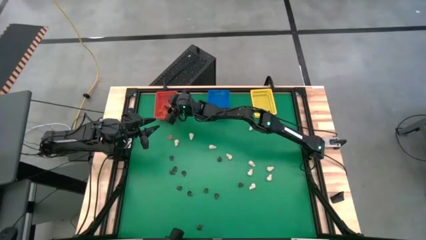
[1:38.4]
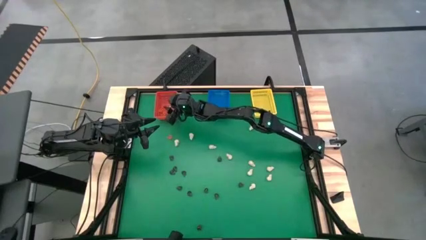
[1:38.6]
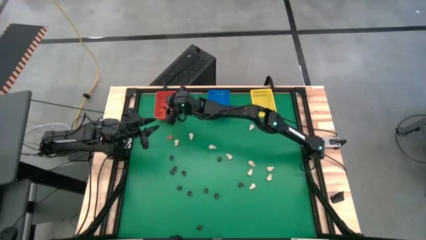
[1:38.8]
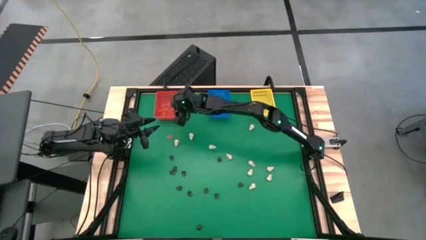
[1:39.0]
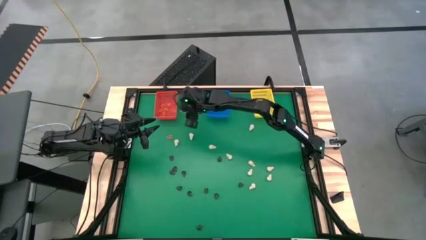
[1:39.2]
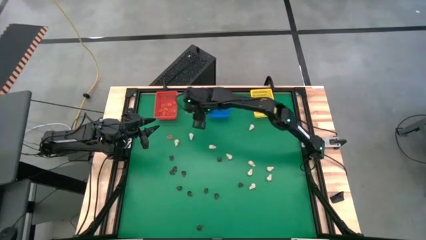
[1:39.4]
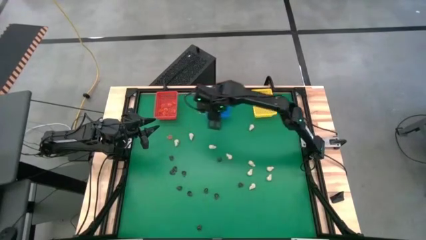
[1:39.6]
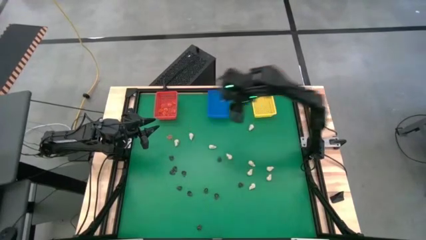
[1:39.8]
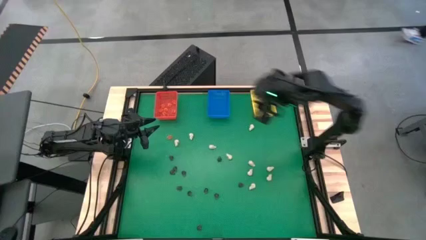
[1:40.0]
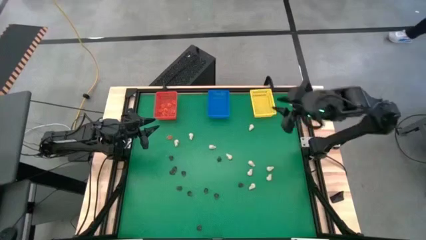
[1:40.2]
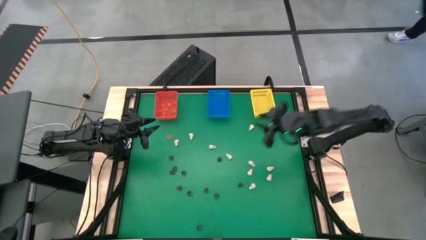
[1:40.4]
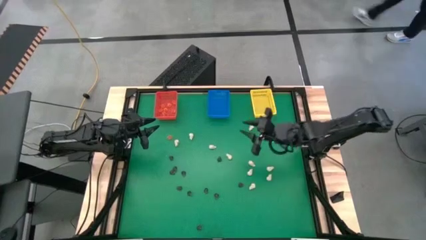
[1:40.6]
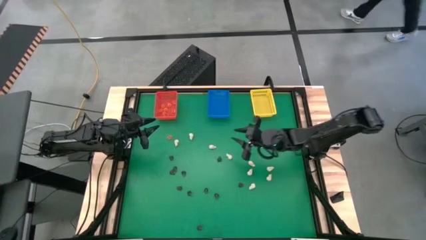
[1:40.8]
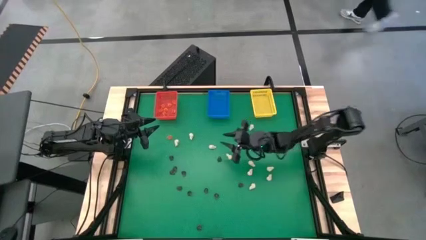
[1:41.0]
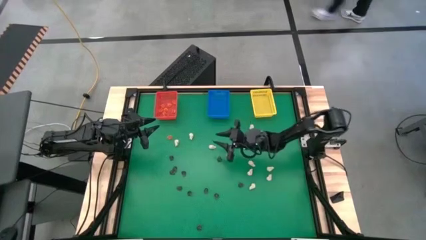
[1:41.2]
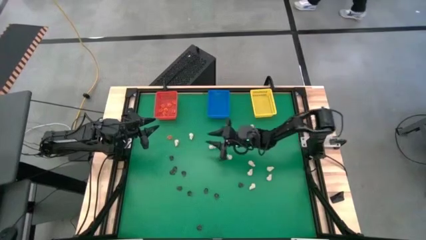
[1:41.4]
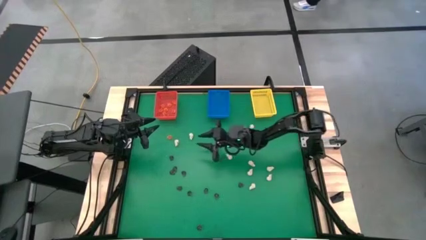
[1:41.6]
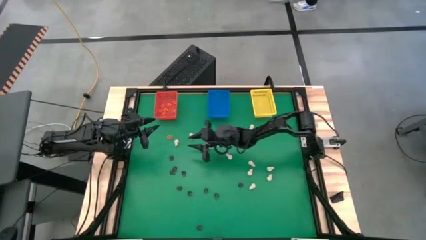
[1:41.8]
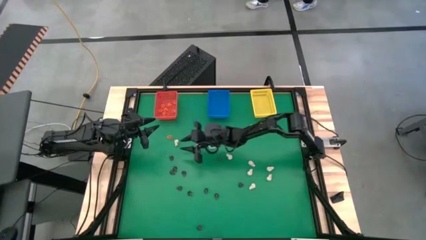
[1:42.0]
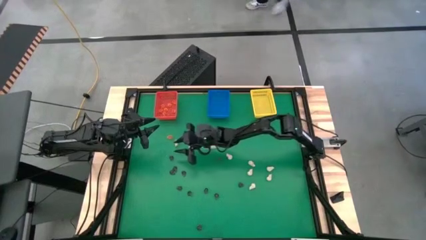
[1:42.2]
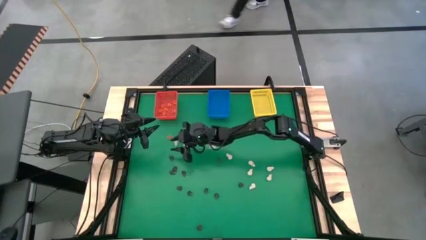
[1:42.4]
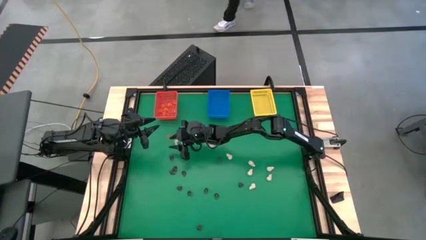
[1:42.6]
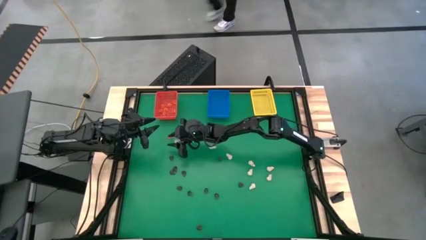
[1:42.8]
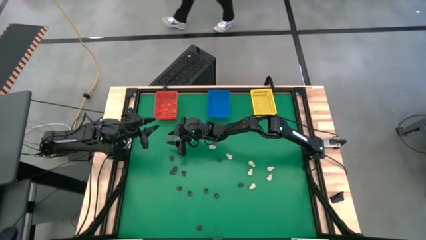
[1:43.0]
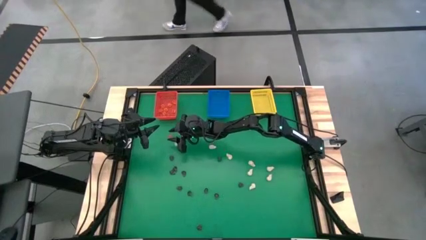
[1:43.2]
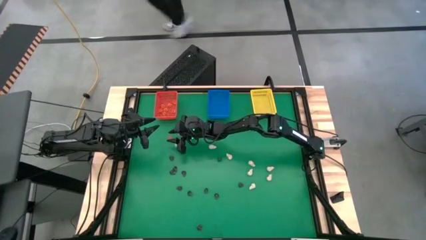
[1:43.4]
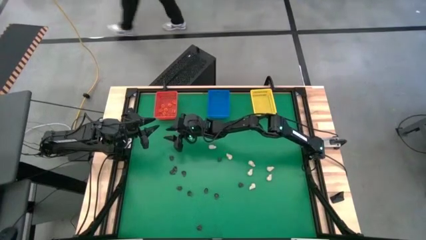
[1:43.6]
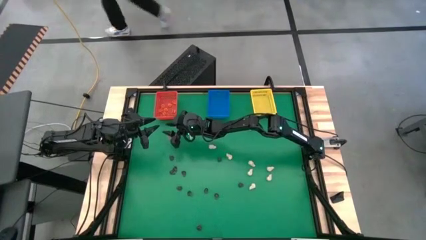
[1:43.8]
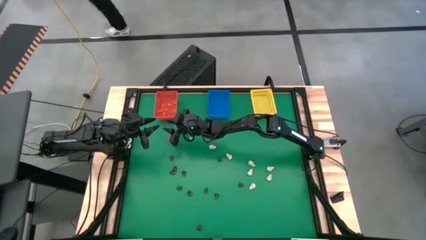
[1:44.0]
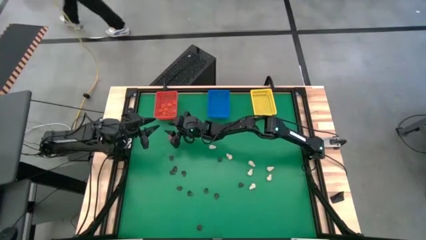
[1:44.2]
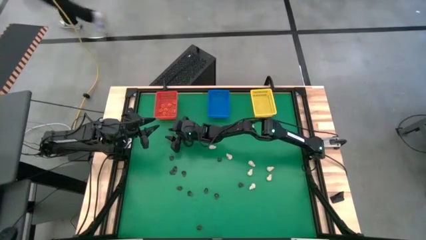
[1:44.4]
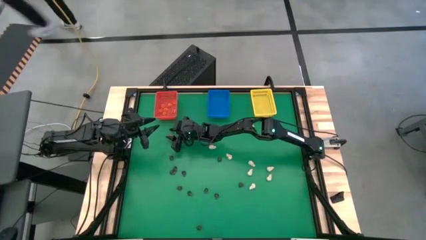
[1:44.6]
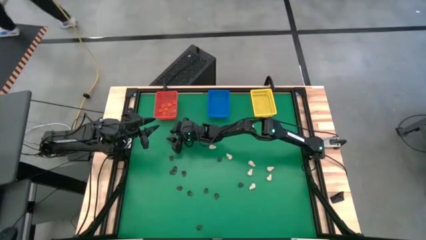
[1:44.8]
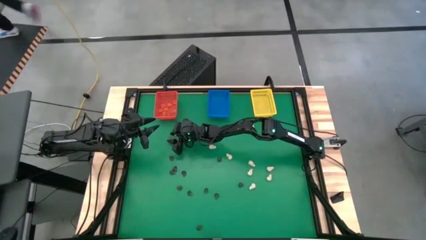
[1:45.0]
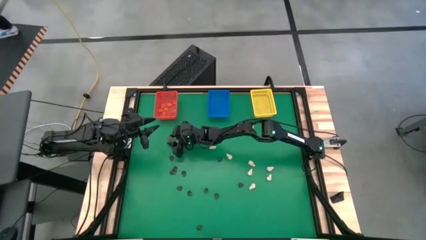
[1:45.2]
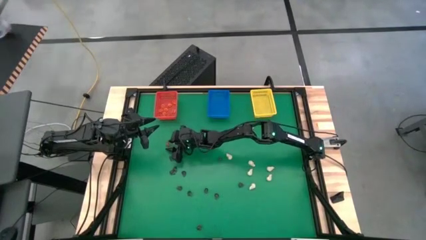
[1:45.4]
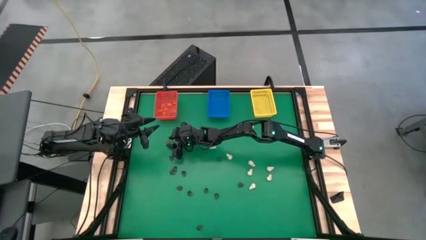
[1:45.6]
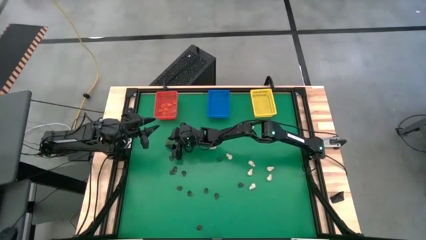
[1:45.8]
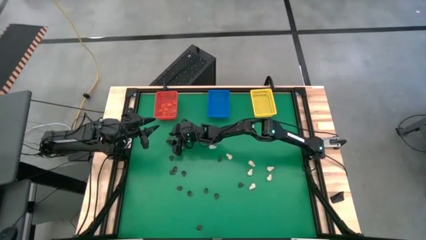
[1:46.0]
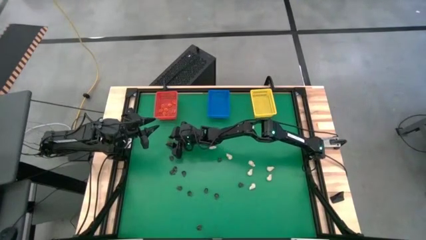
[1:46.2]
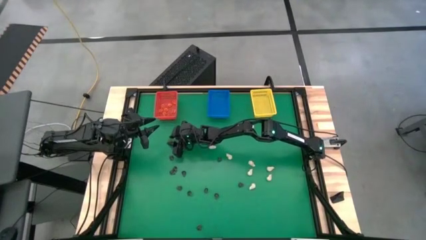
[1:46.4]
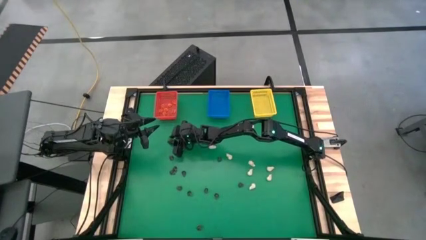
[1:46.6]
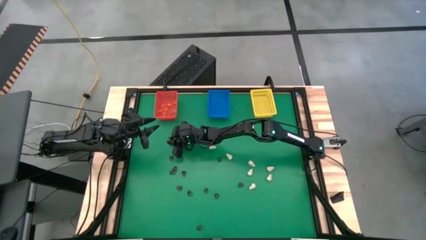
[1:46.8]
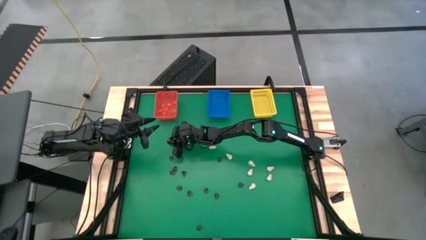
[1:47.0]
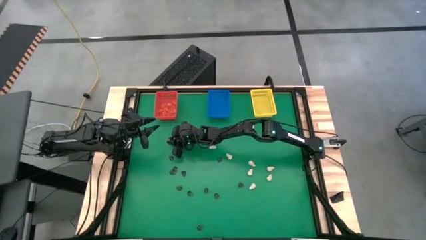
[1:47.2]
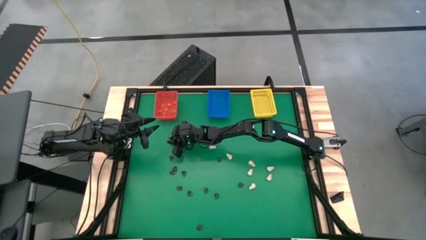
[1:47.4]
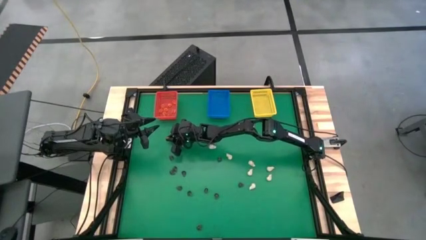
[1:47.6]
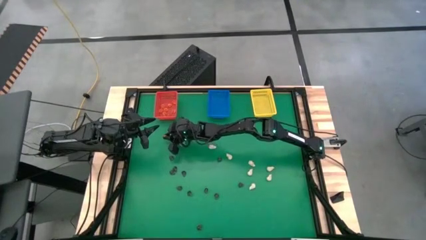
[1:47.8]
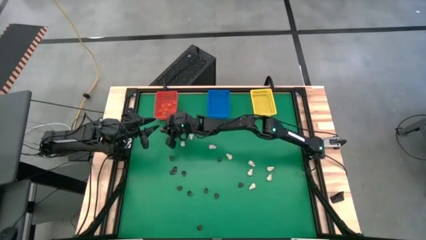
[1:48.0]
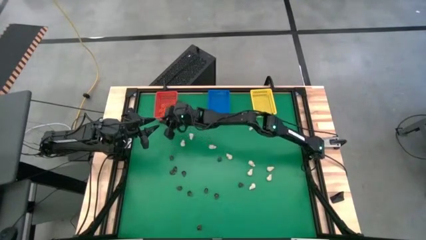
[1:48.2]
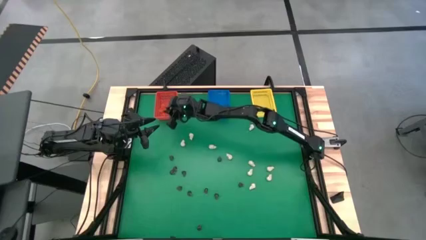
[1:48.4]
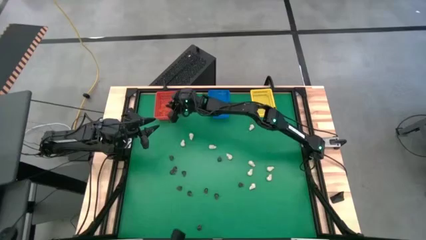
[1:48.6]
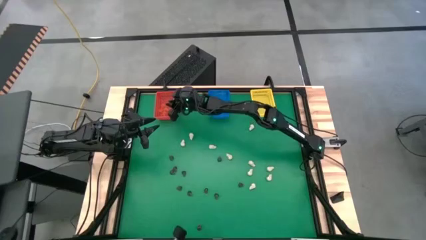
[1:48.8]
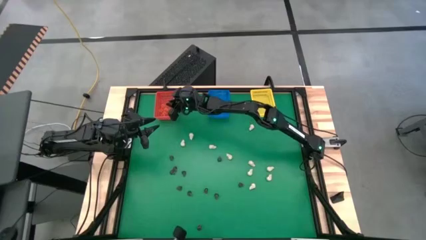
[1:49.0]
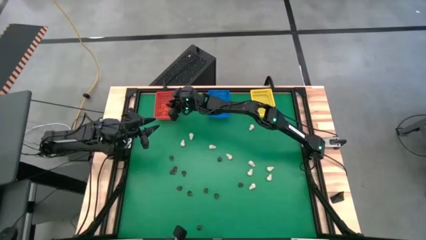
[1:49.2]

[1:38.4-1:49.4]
Task: Sort Halloween decoration
Put the orange pumpkin toy into the red bin

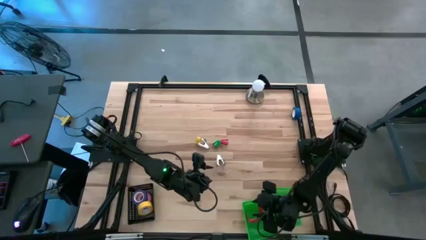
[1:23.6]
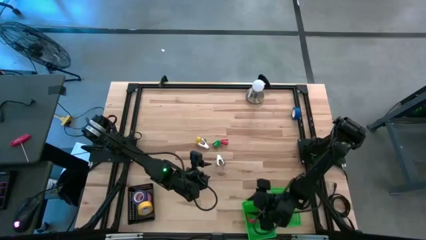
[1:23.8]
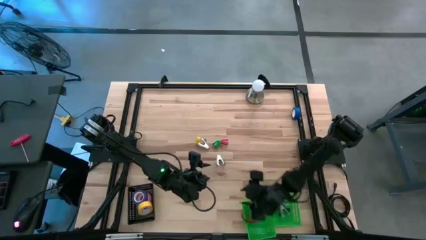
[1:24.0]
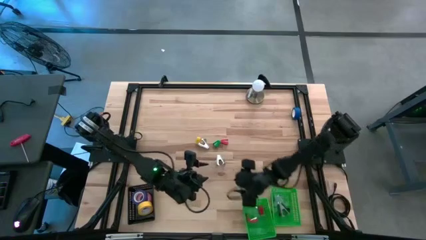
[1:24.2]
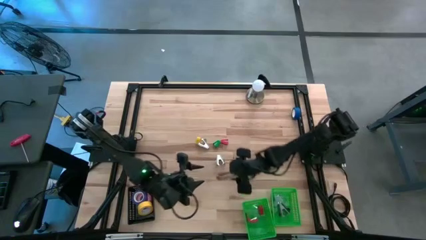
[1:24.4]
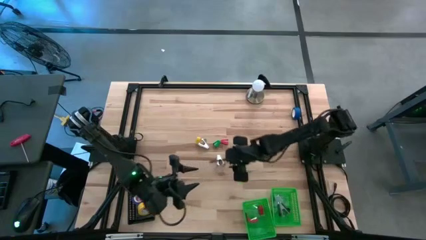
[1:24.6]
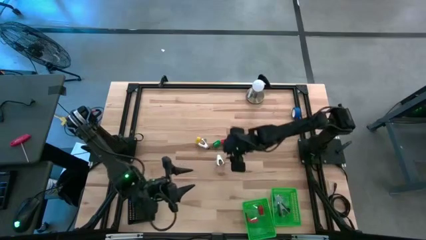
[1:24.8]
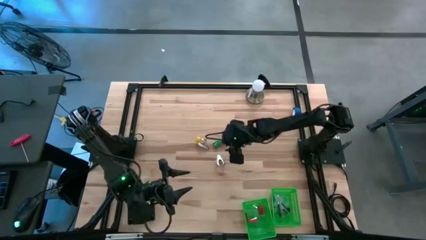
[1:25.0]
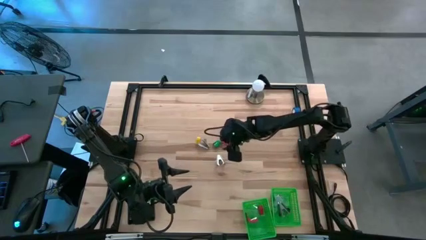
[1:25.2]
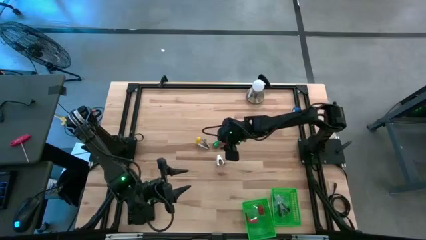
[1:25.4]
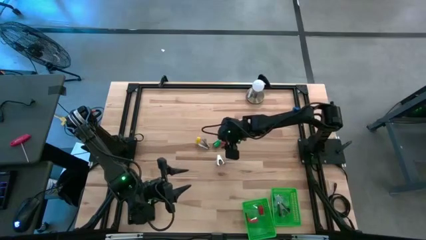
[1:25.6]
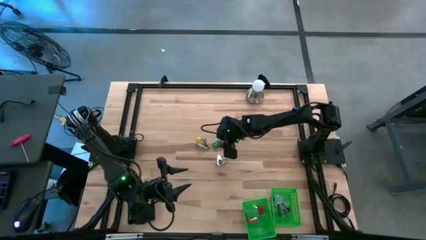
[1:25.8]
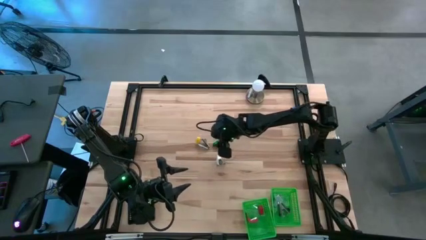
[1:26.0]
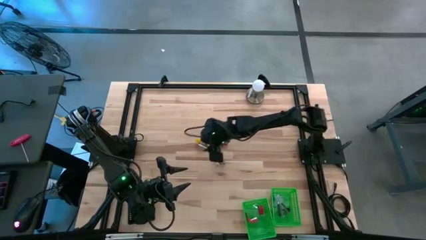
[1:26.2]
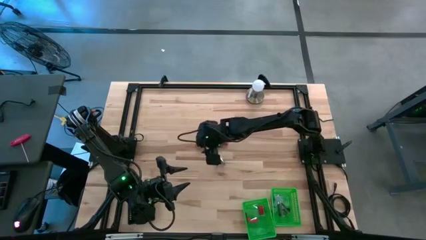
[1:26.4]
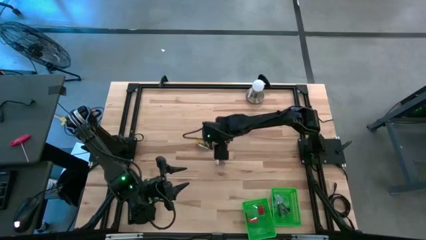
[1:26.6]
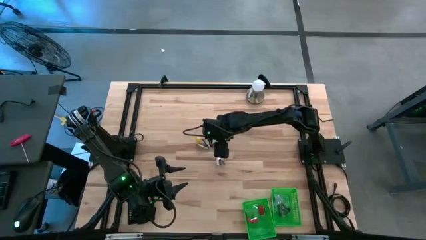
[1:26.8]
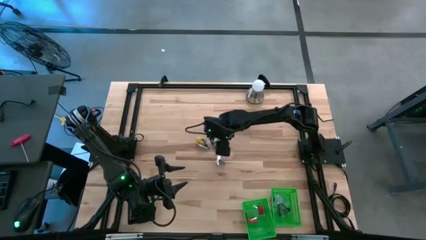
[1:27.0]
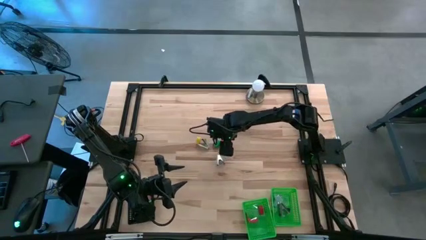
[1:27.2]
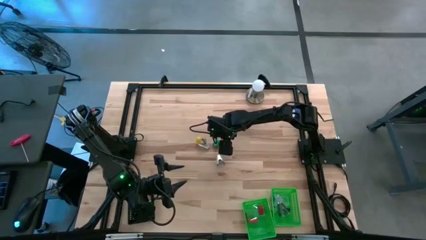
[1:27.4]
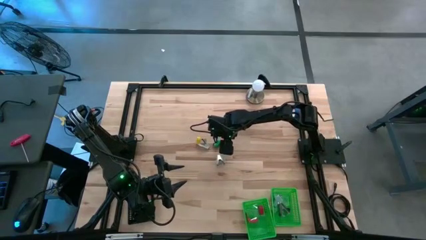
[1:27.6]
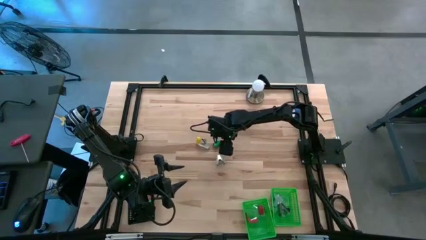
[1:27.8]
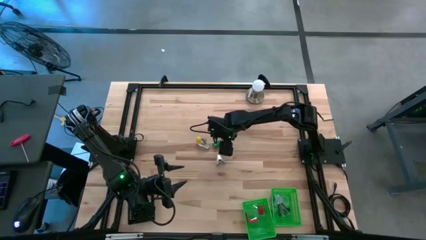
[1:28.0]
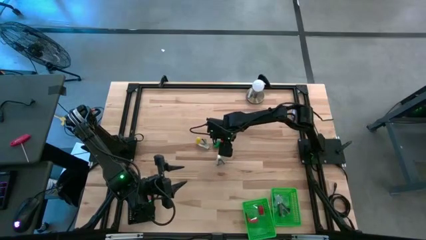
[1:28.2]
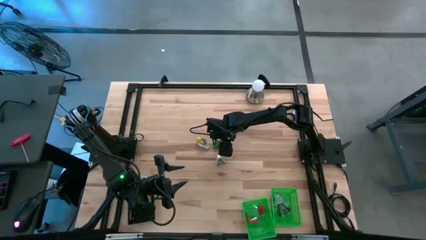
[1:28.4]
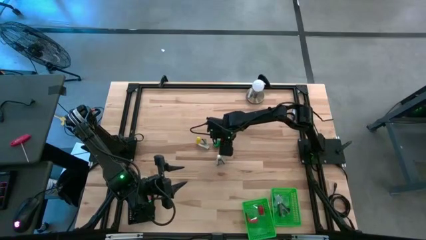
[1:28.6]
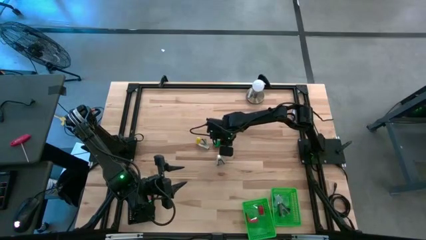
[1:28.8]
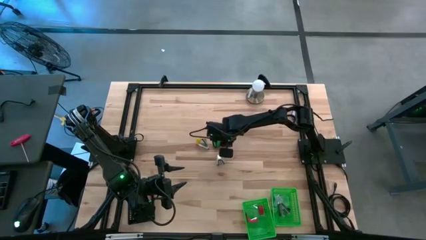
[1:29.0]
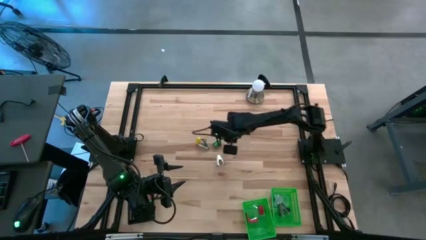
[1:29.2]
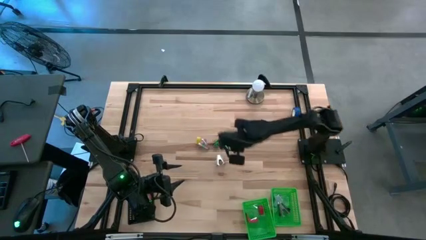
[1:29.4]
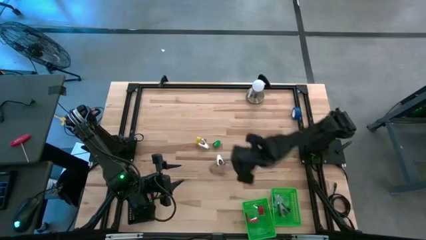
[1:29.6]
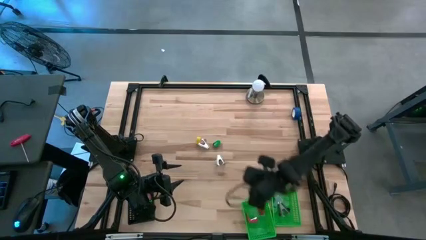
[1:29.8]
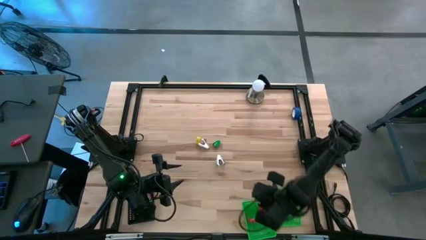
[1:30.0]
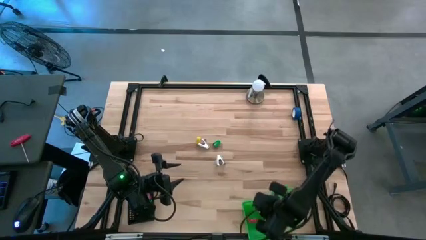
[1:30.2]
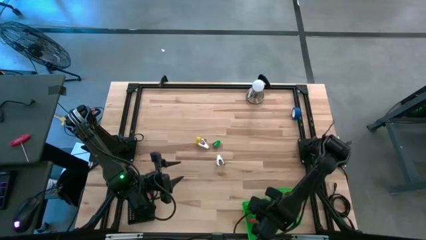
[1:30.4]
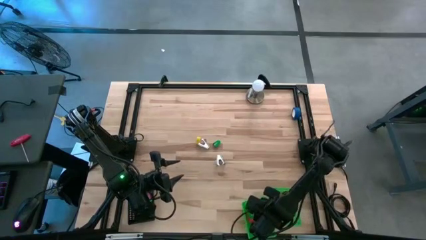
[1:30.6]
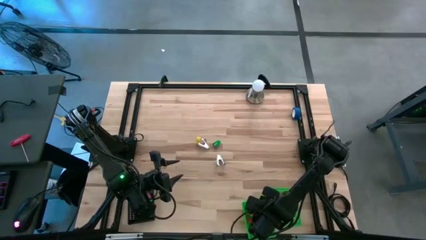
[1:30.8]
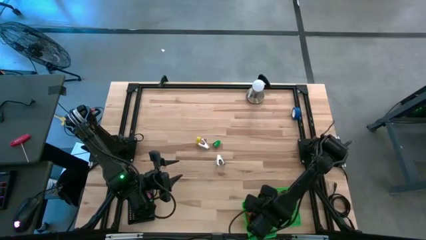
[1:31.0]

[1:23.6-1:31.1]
Task: Pick and place Stapler, Stapler remover, tape
Put the red stapler into the left green bin
